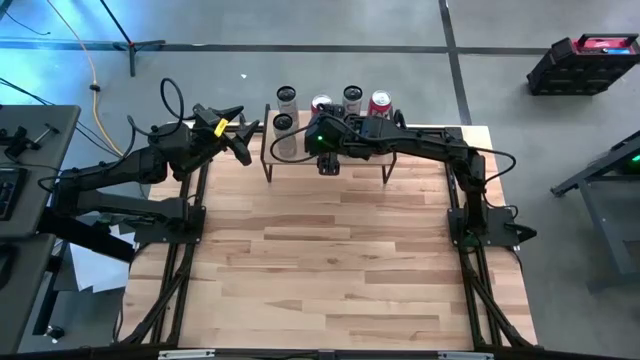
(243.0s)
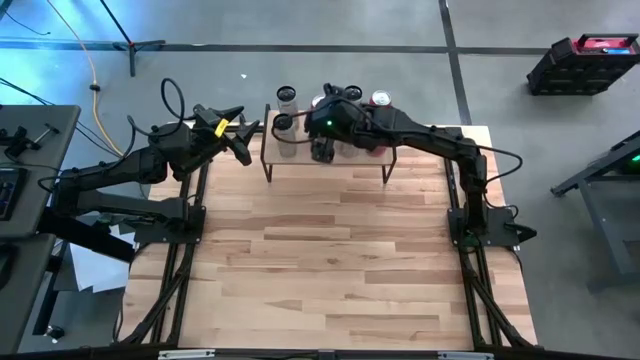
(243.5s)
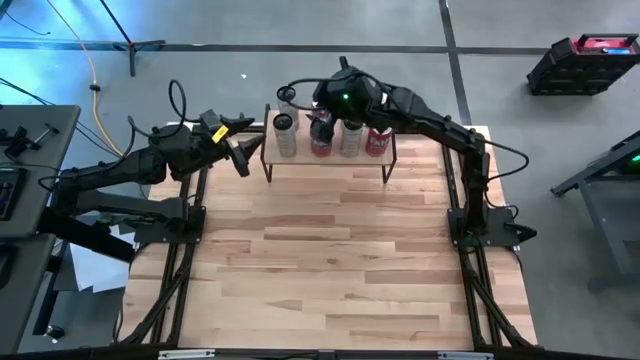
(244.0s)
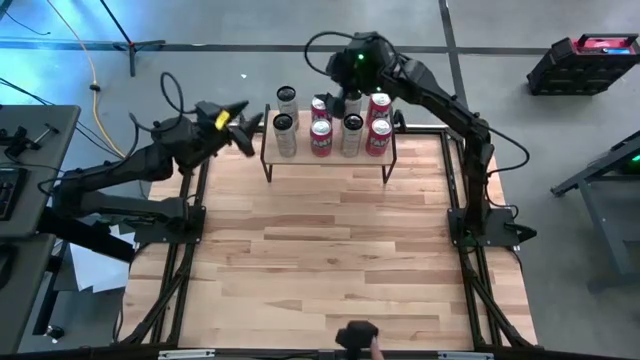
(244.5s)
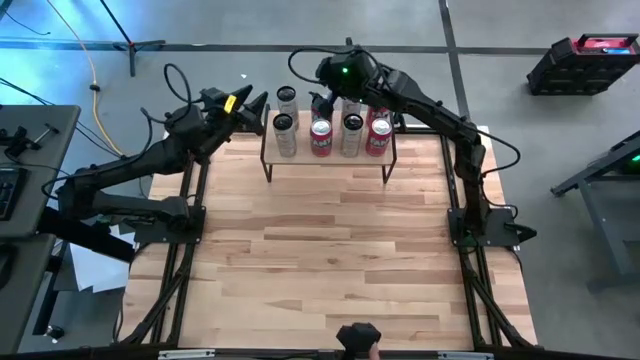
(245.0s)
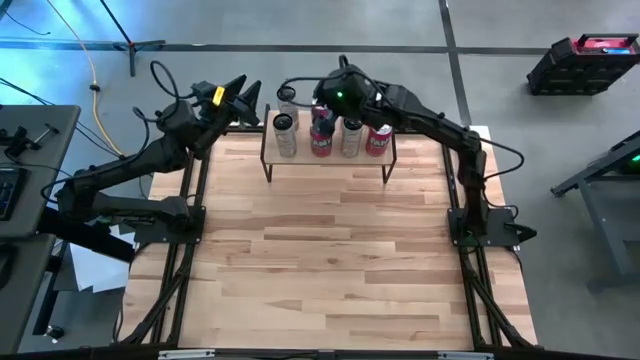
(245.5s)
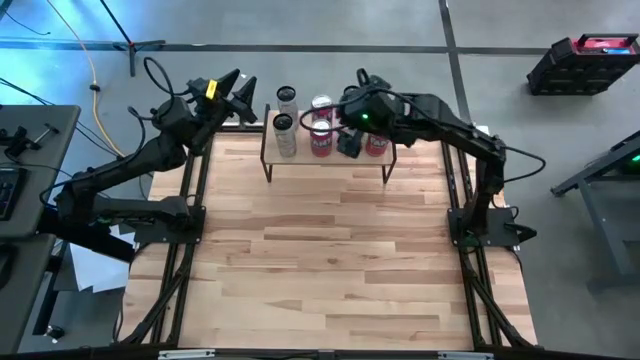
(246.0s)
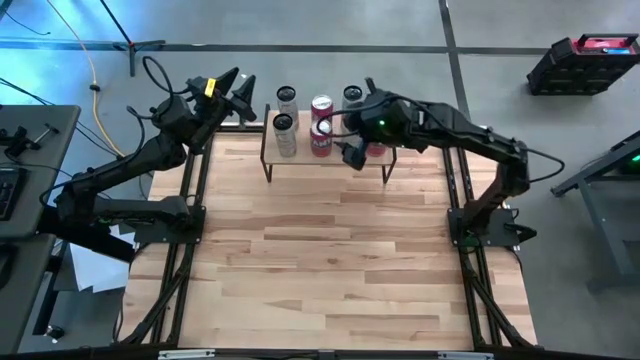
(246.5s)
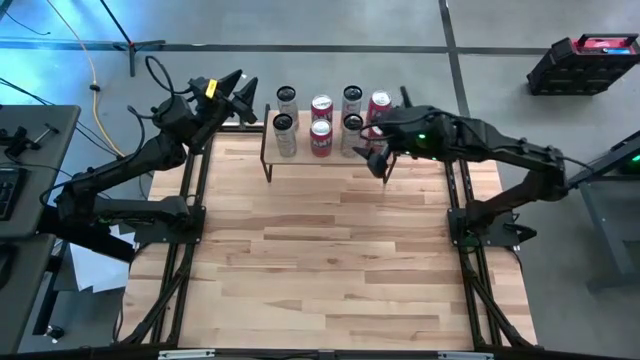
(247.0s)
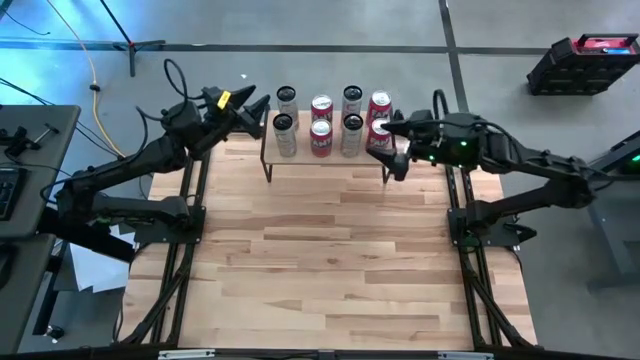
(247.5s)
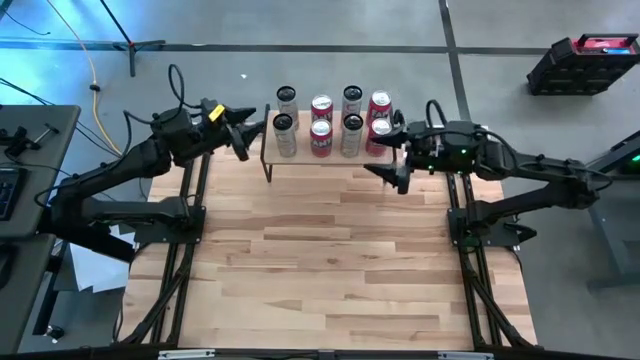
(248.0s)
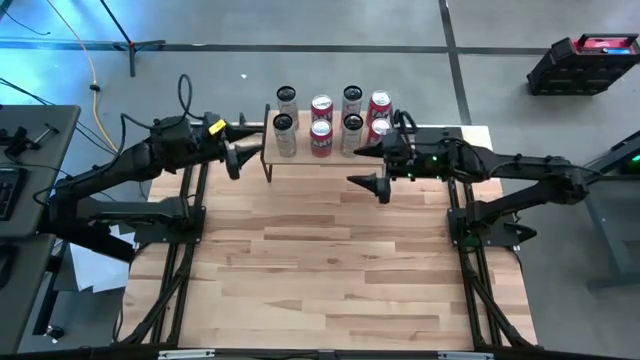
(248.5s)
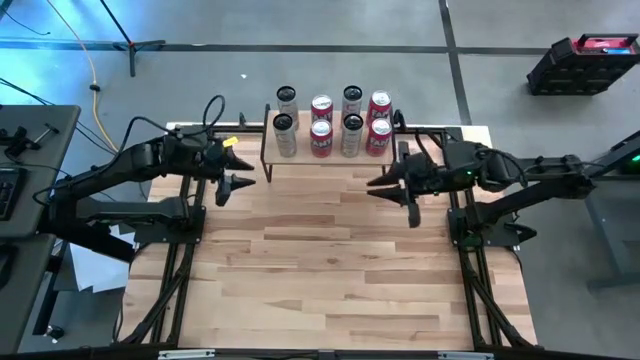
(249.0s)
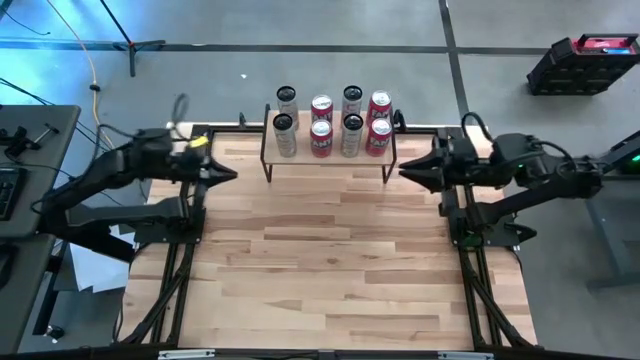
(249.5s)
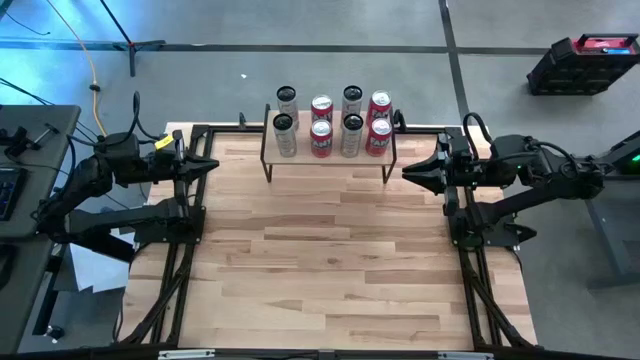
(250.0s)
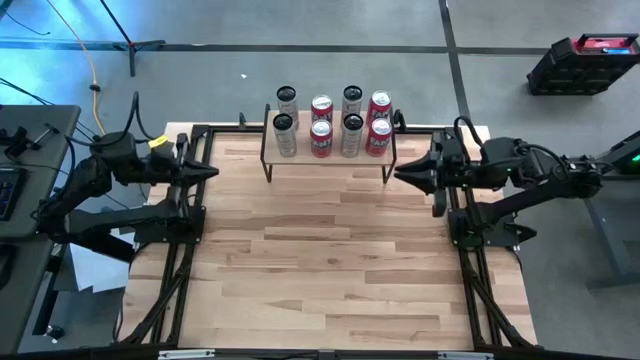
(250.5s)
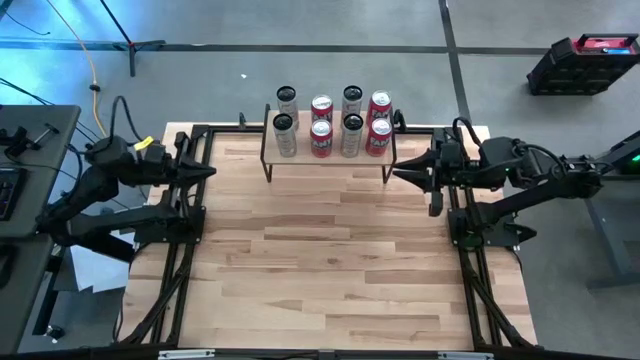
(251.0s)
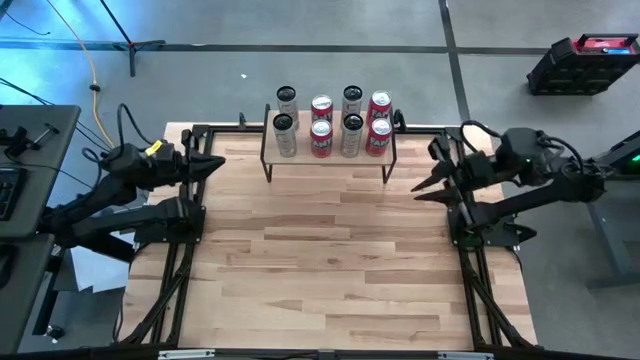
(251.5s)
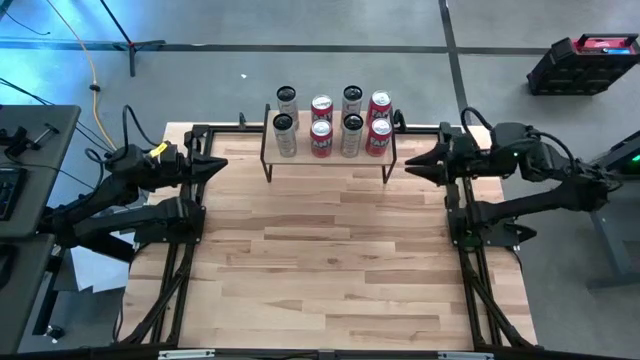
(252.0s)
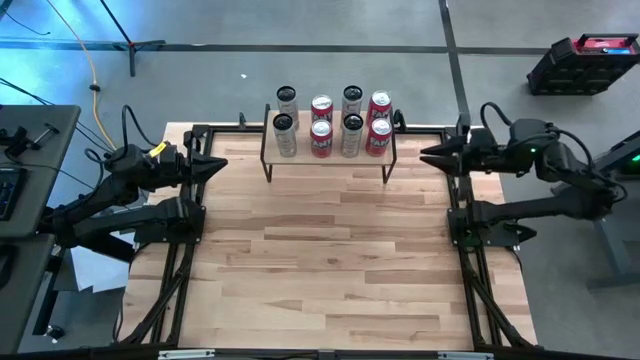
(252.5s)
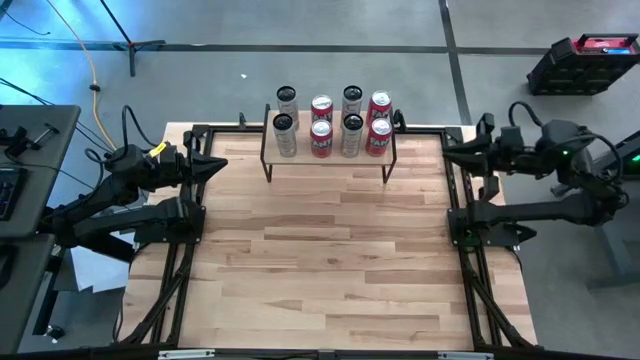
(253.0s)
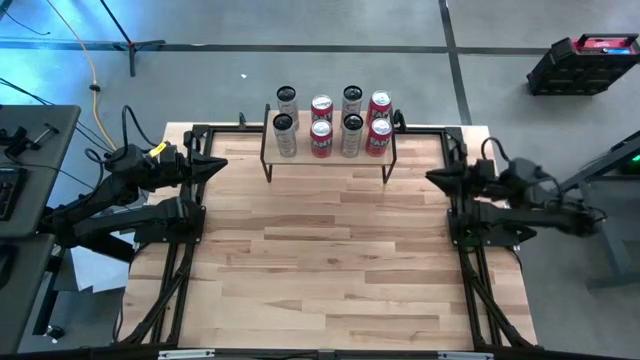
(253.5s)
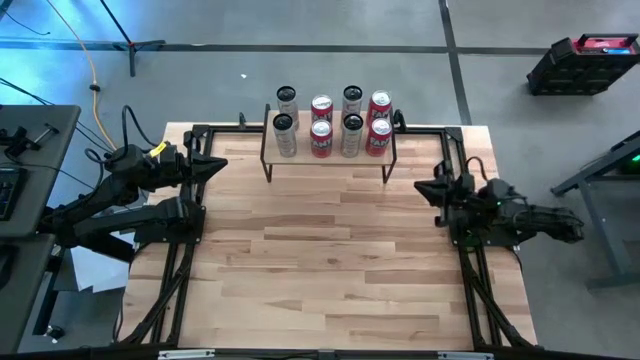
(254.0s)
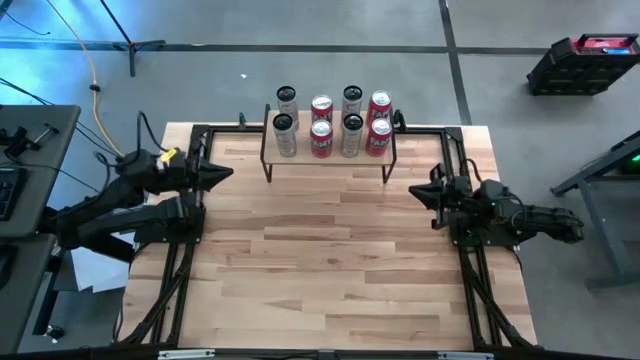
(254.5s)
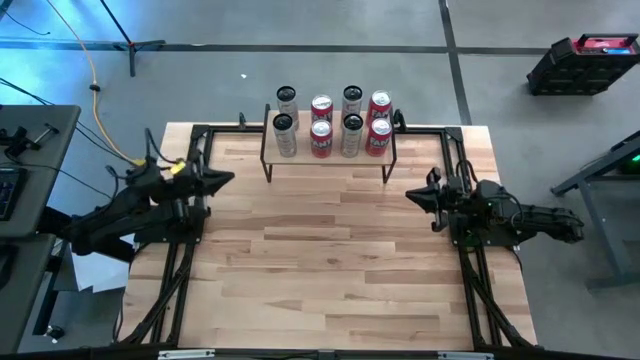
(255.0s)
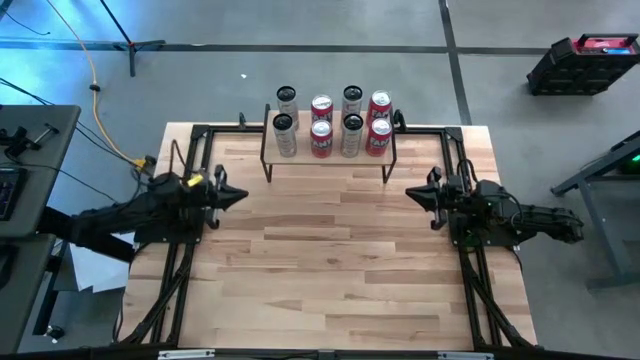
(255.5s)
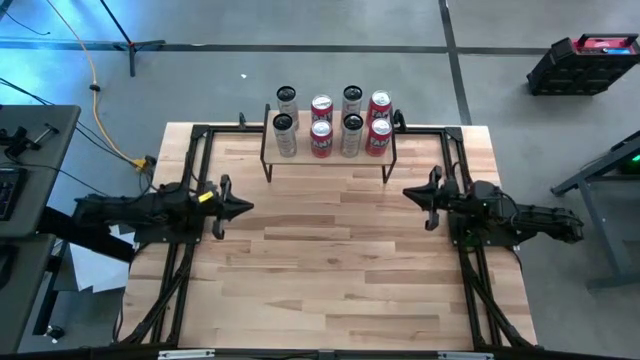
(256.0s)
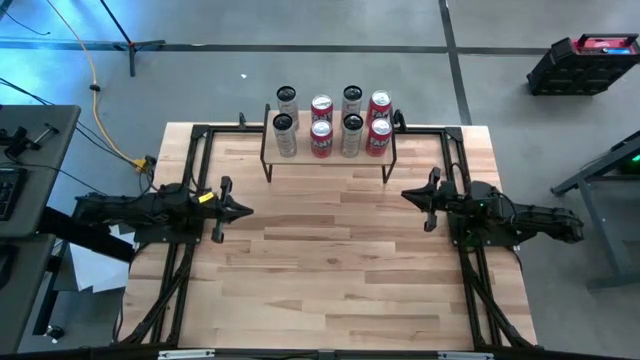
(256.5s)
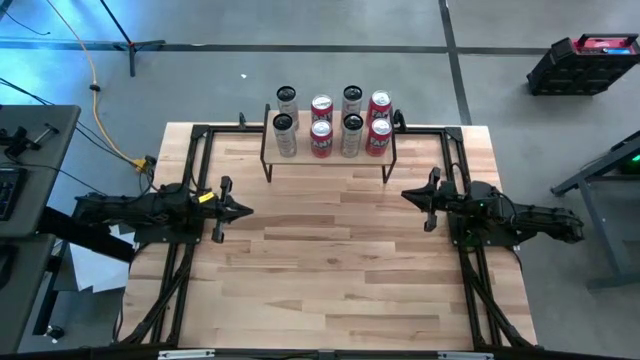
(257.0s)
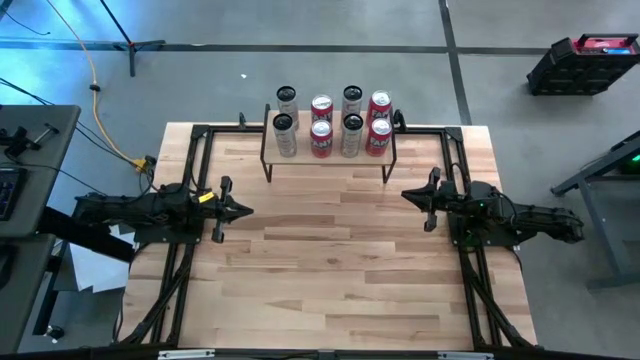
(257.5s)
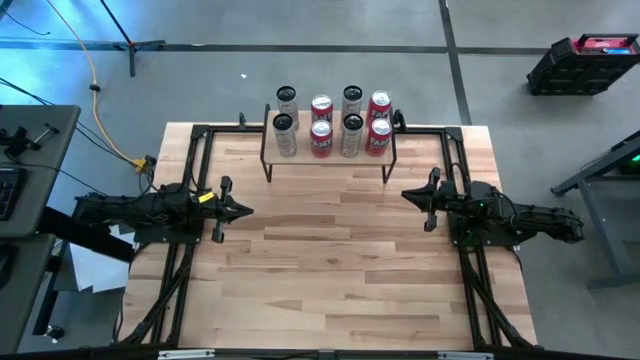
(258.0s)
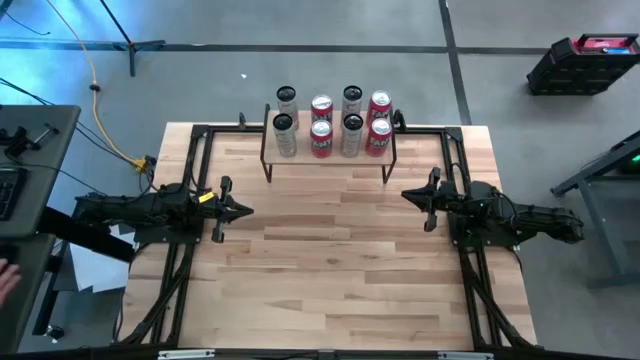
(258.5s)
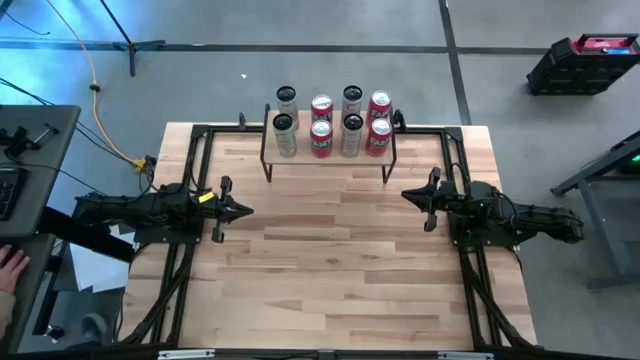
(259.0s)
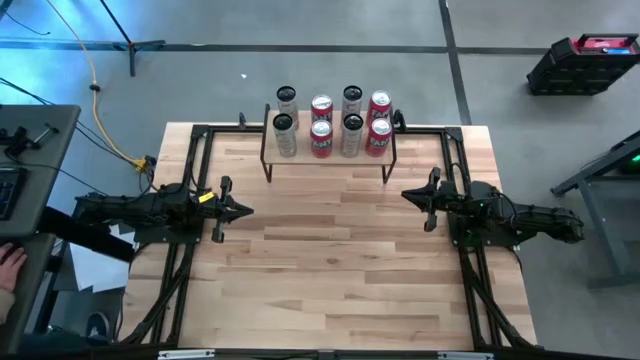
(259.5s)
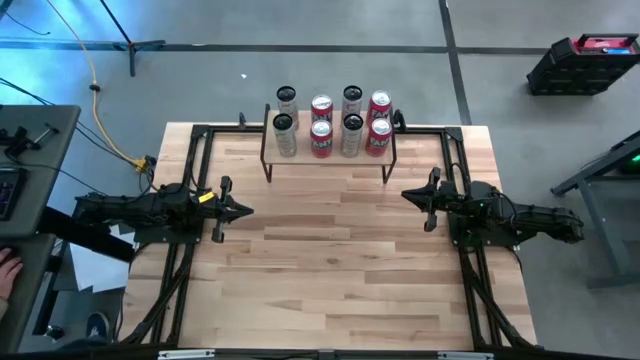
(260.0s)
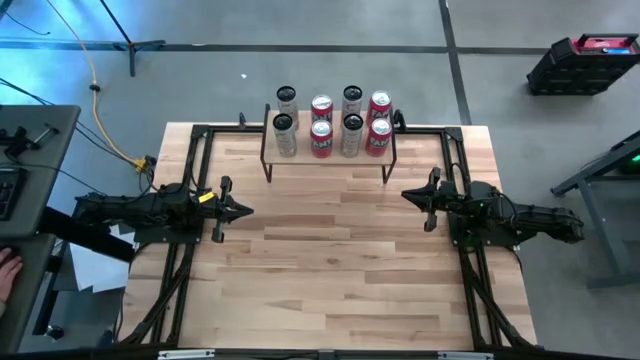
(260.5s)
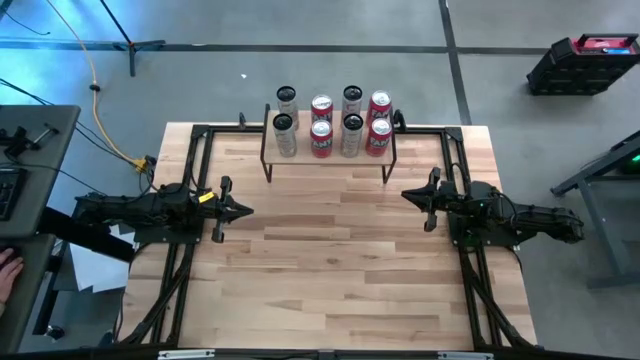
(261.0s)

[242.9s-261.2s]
Task: Place canned beverage on shelf
Return to Home Position

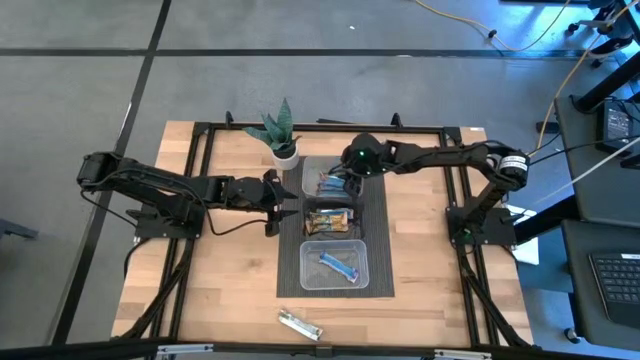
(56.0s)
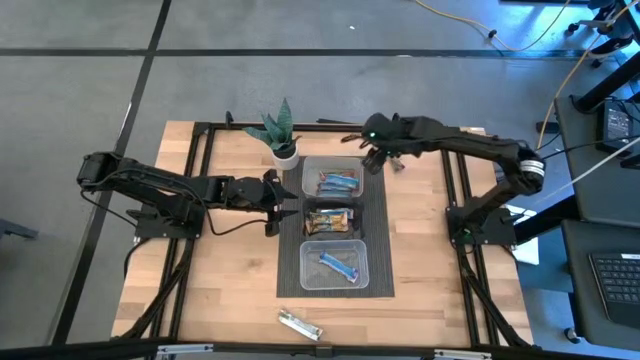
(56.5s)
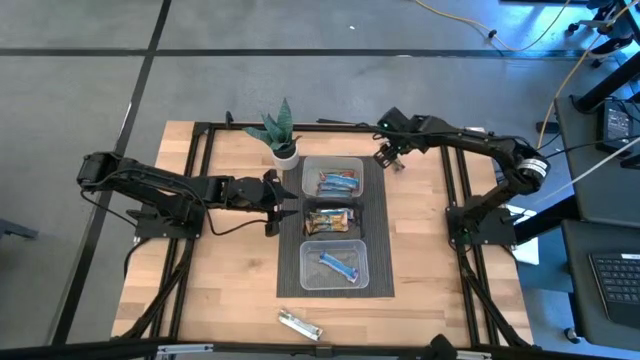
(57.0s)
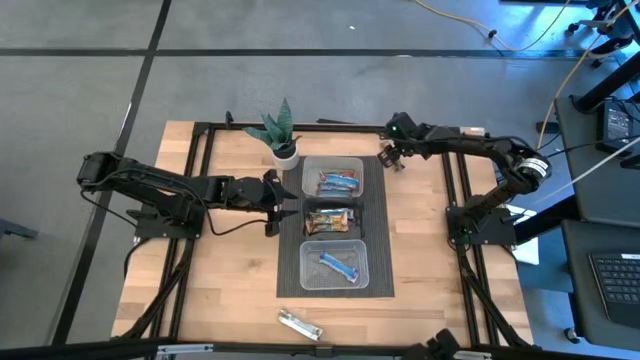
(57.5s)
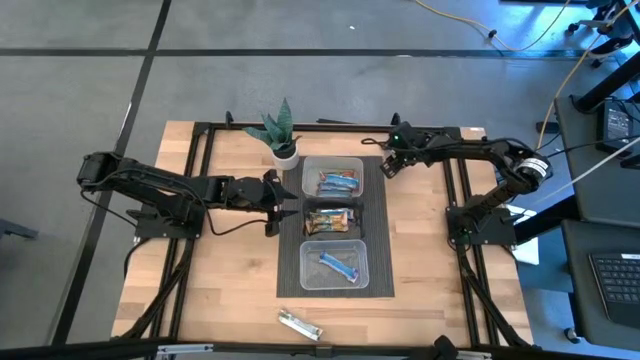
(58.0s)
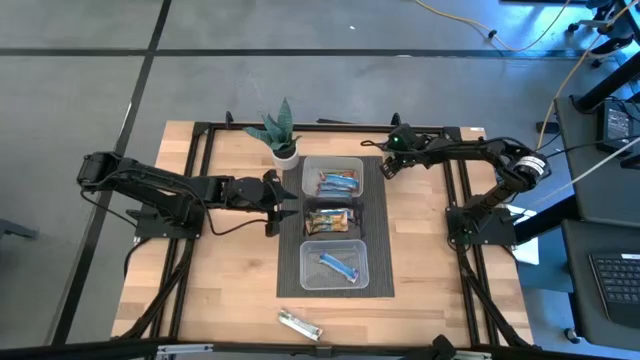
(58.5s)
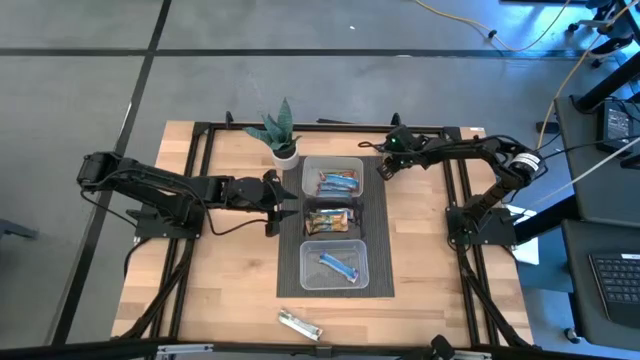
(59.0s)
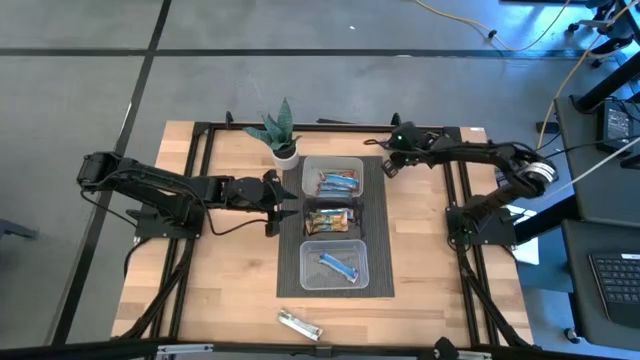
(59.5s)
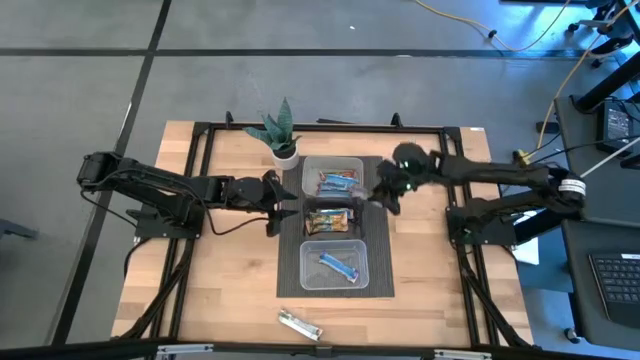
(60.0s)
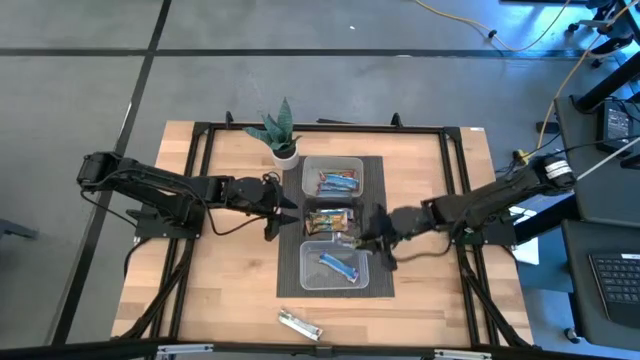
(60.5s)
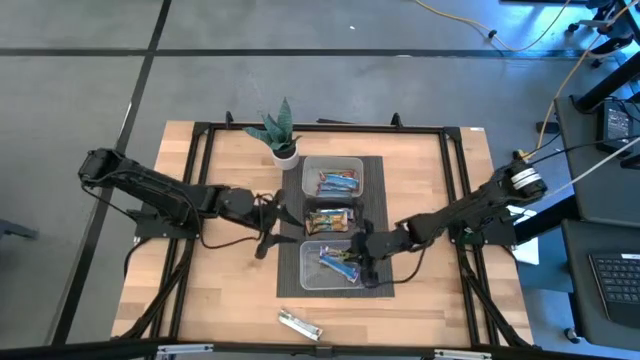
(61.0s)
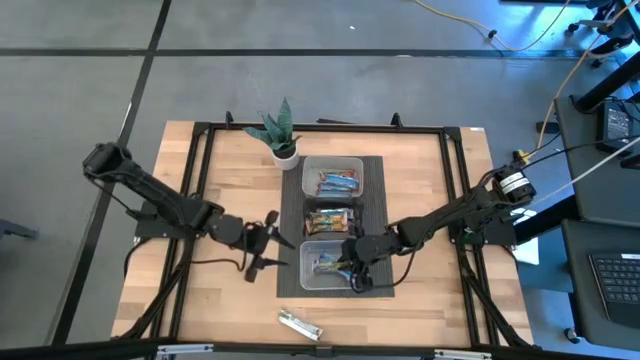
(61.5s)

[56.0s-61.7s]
Task: Pick and place Granola Bars by type
Put the blue granola bar into the transparent bin
